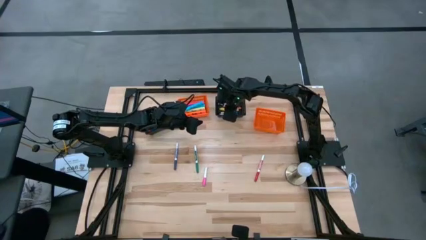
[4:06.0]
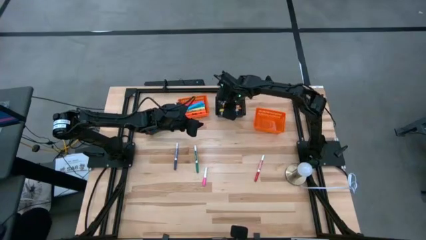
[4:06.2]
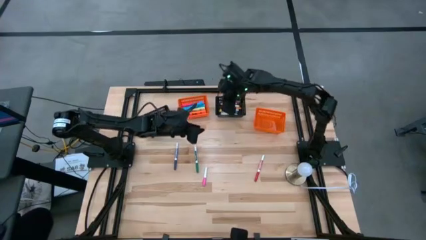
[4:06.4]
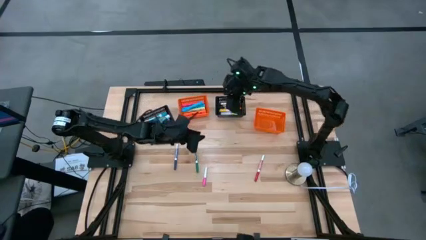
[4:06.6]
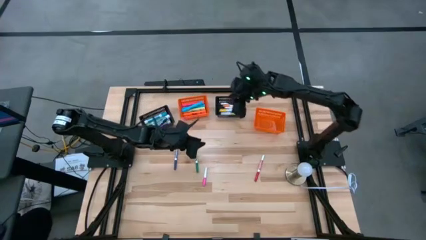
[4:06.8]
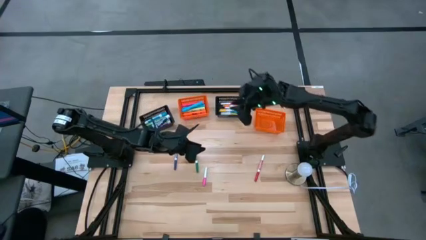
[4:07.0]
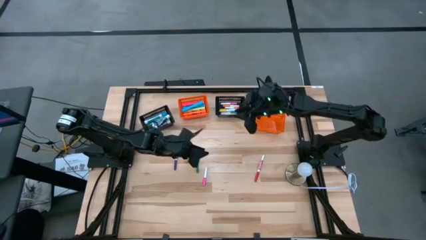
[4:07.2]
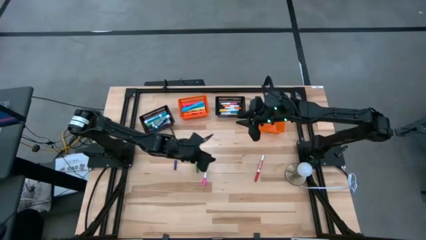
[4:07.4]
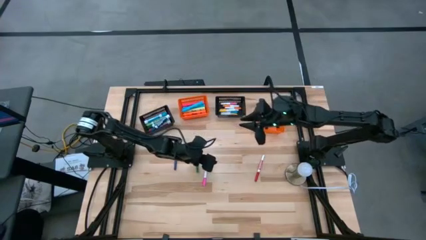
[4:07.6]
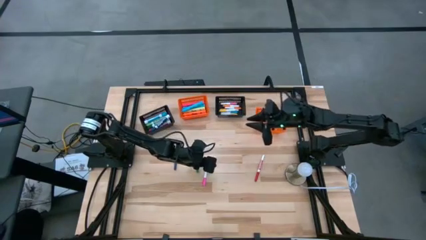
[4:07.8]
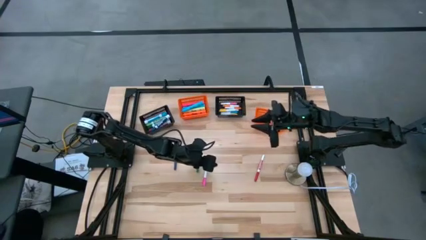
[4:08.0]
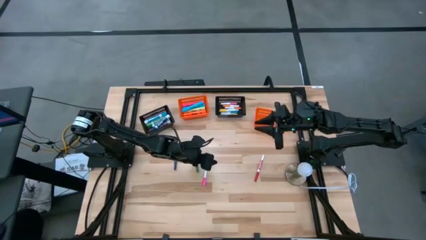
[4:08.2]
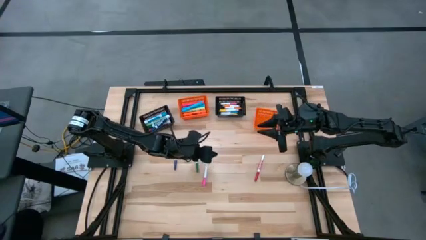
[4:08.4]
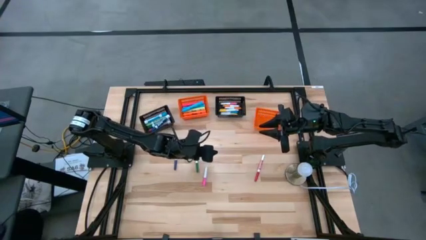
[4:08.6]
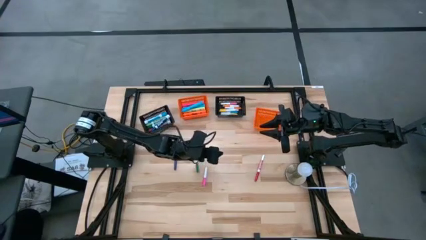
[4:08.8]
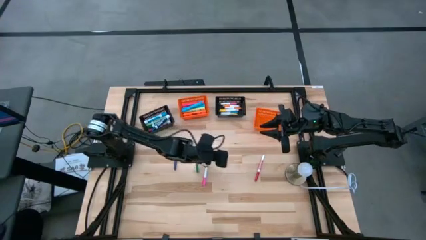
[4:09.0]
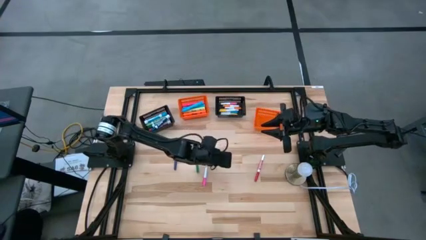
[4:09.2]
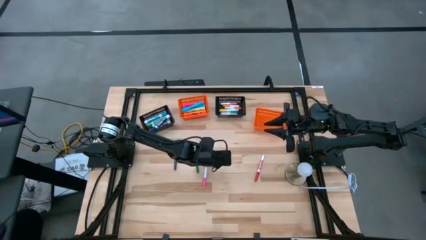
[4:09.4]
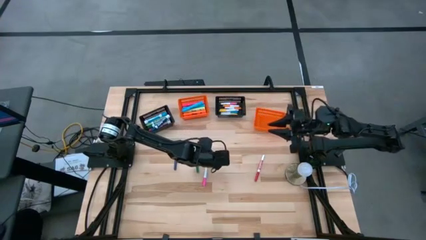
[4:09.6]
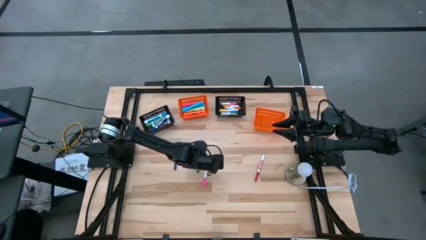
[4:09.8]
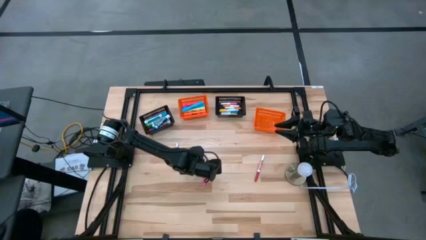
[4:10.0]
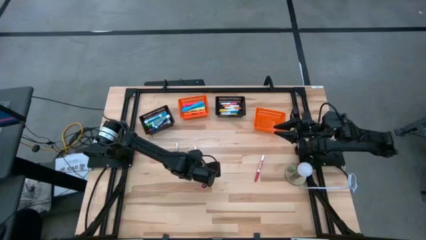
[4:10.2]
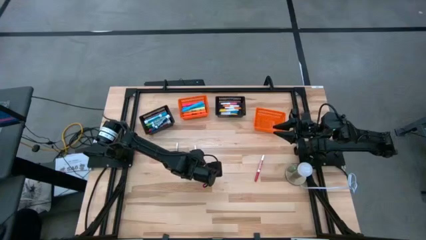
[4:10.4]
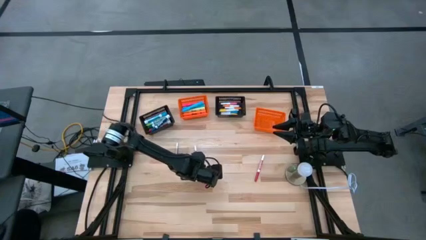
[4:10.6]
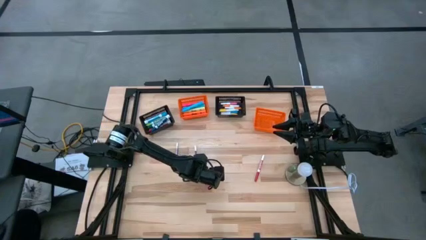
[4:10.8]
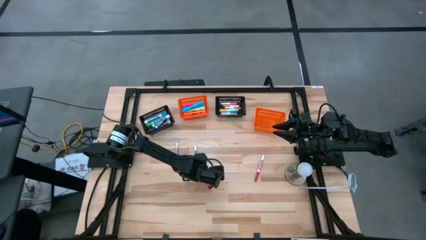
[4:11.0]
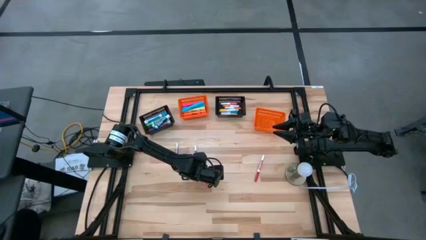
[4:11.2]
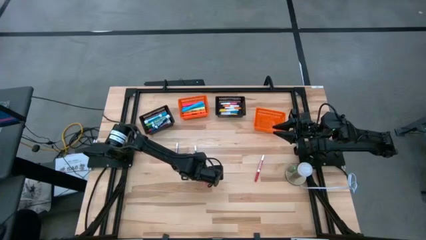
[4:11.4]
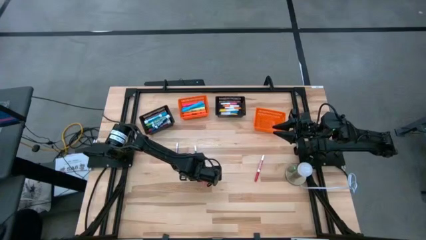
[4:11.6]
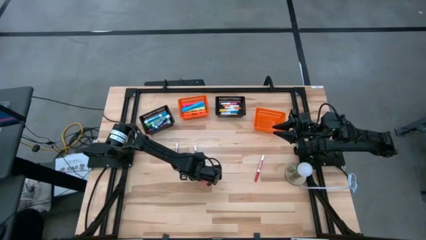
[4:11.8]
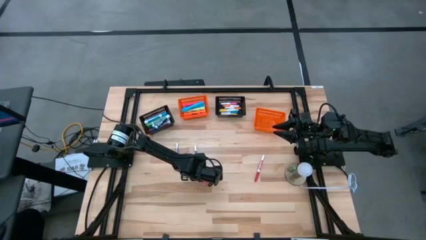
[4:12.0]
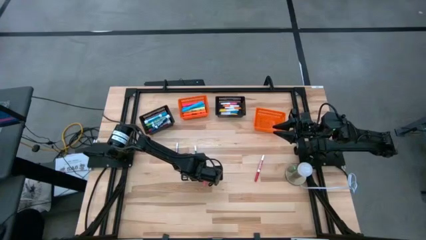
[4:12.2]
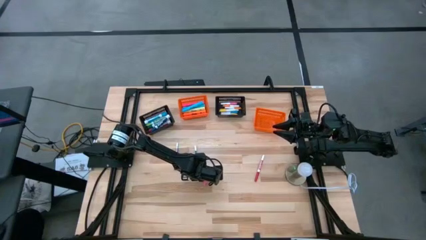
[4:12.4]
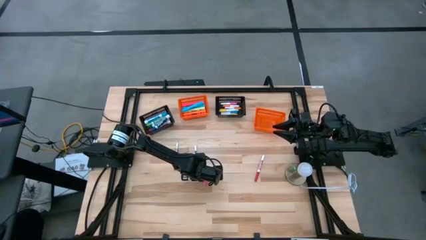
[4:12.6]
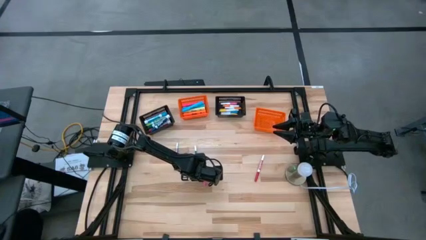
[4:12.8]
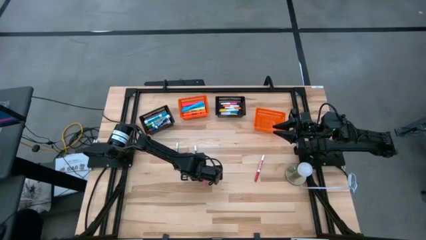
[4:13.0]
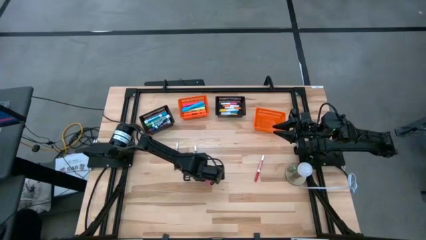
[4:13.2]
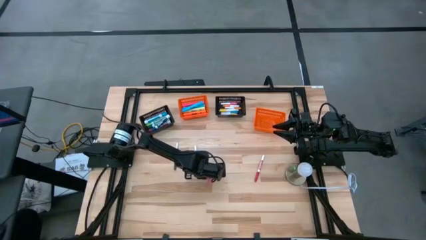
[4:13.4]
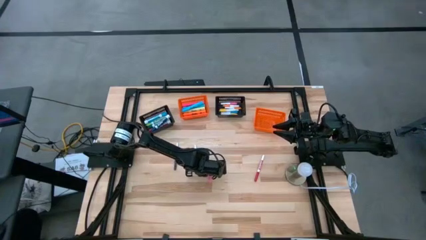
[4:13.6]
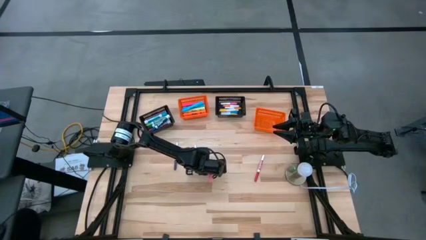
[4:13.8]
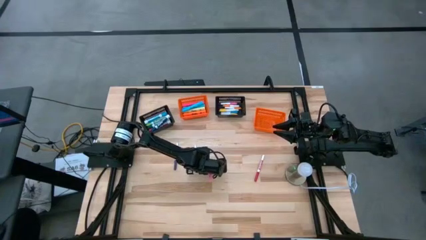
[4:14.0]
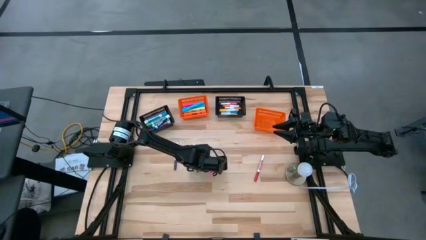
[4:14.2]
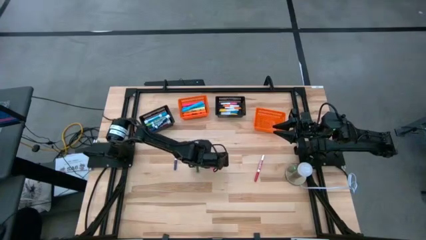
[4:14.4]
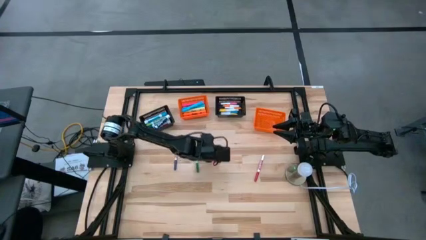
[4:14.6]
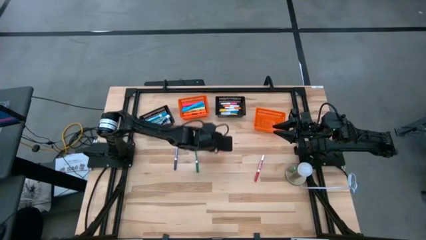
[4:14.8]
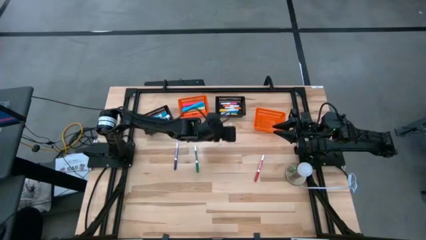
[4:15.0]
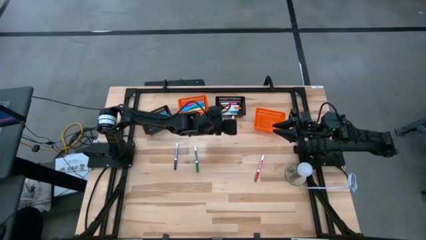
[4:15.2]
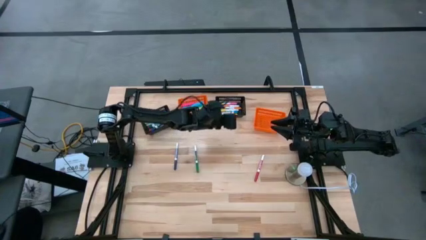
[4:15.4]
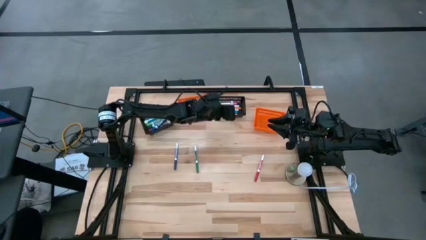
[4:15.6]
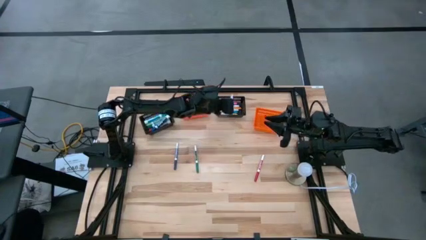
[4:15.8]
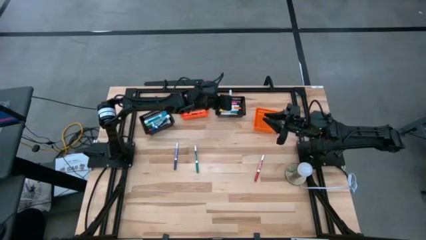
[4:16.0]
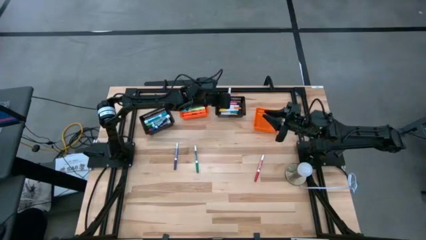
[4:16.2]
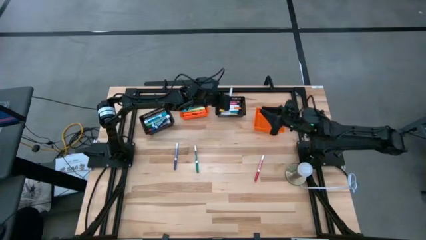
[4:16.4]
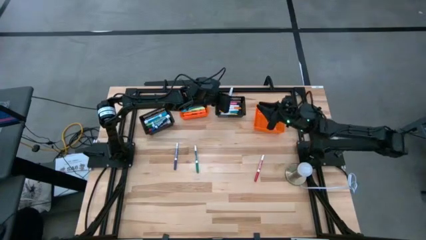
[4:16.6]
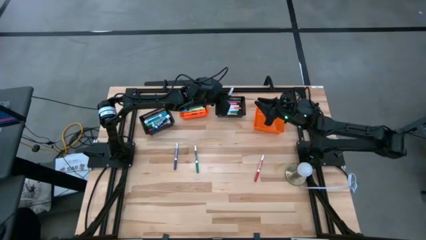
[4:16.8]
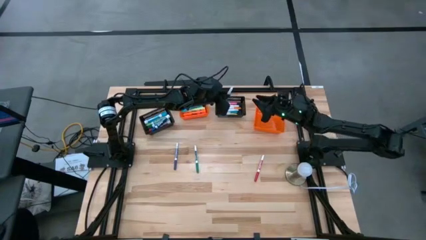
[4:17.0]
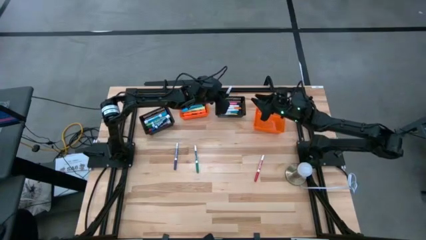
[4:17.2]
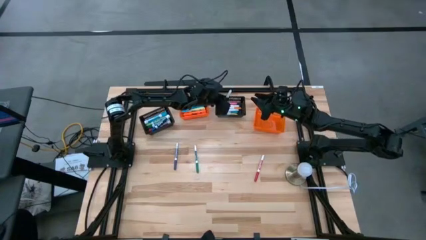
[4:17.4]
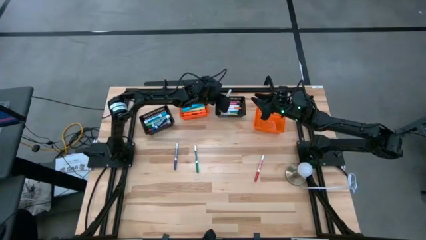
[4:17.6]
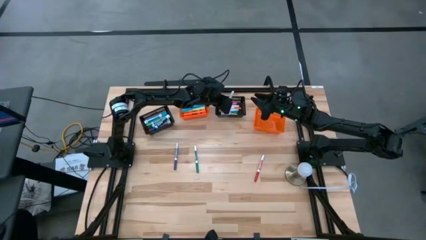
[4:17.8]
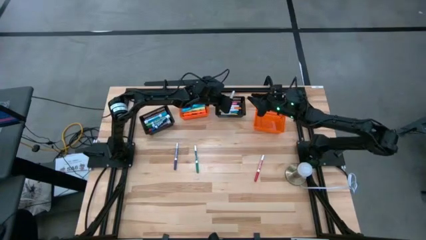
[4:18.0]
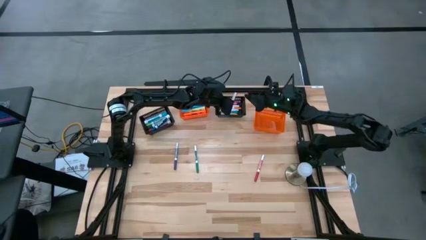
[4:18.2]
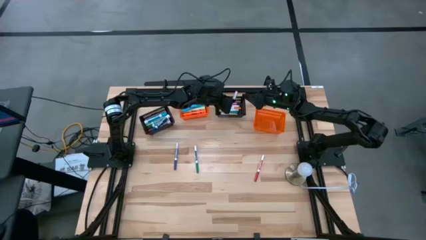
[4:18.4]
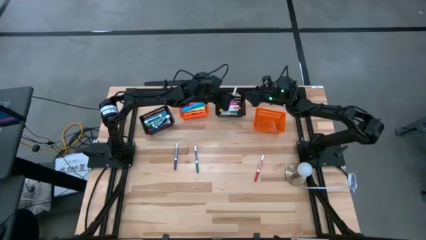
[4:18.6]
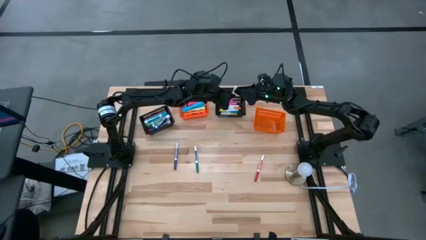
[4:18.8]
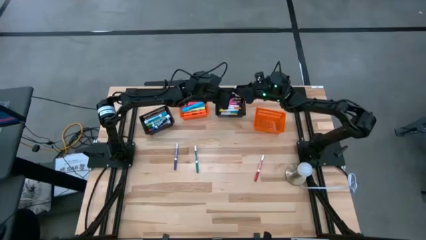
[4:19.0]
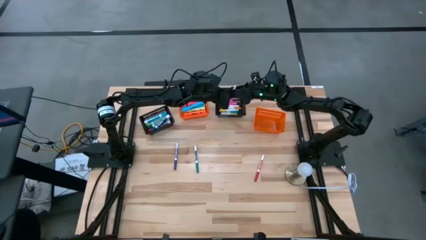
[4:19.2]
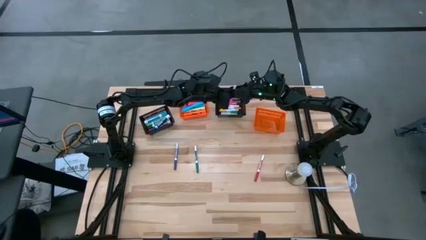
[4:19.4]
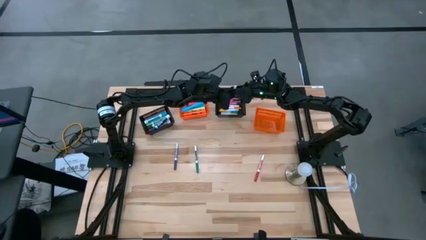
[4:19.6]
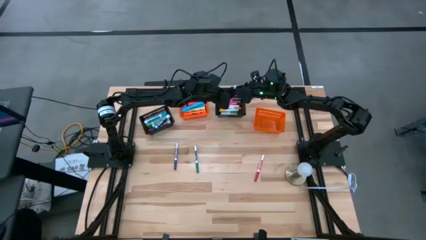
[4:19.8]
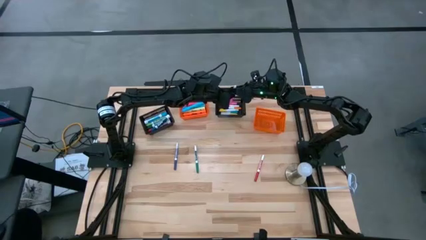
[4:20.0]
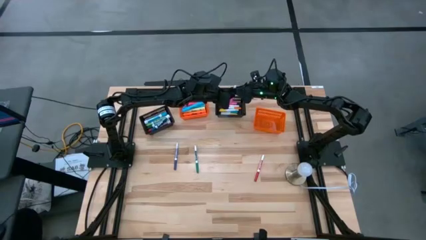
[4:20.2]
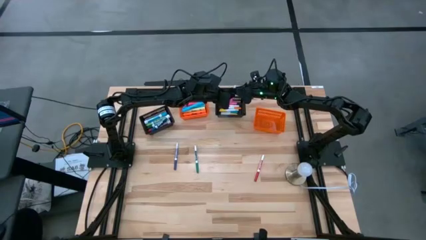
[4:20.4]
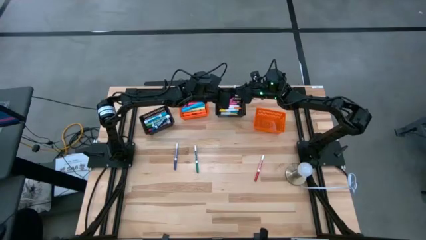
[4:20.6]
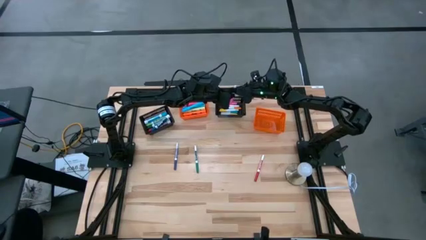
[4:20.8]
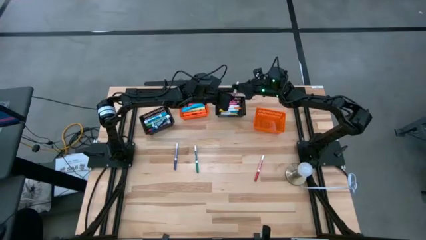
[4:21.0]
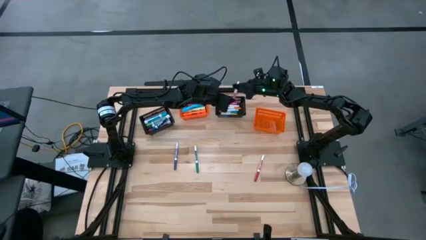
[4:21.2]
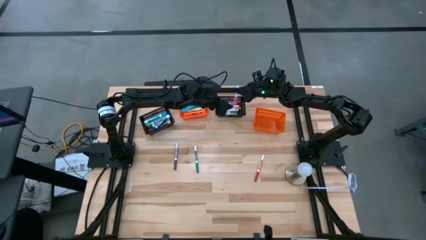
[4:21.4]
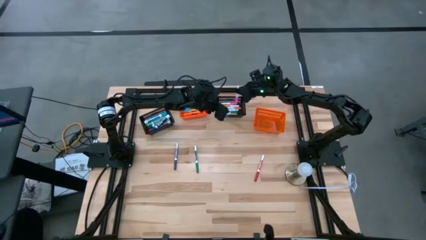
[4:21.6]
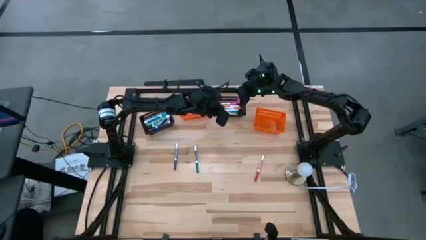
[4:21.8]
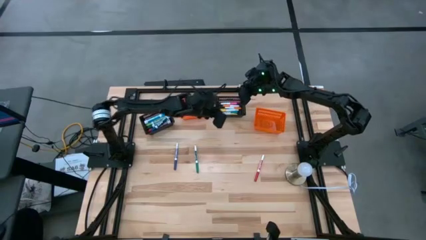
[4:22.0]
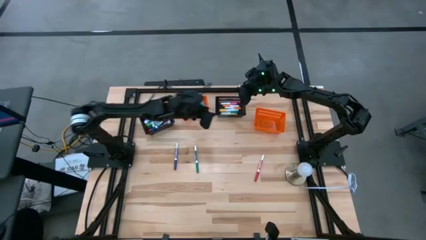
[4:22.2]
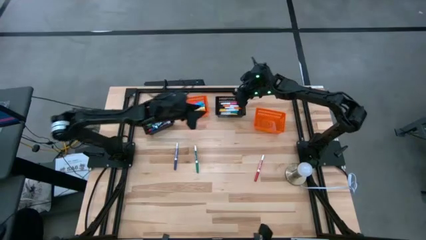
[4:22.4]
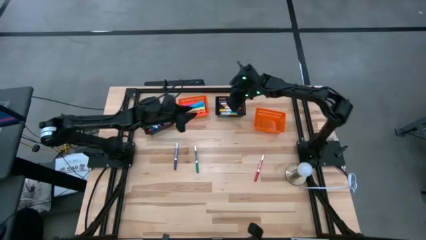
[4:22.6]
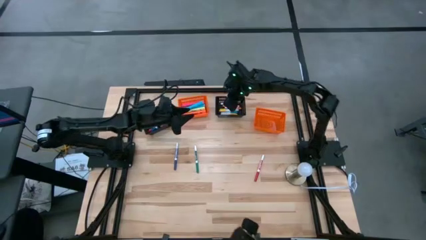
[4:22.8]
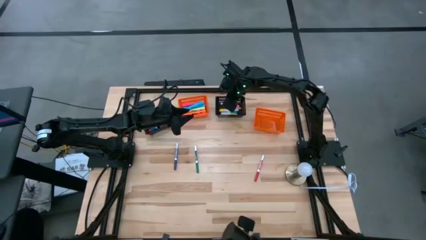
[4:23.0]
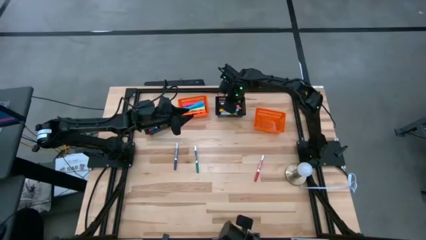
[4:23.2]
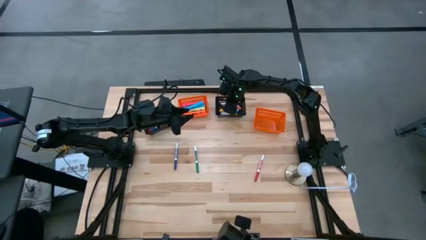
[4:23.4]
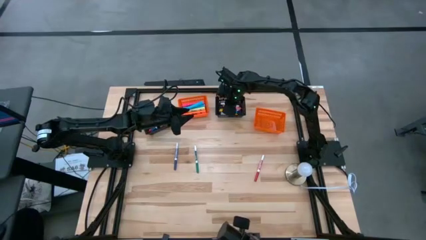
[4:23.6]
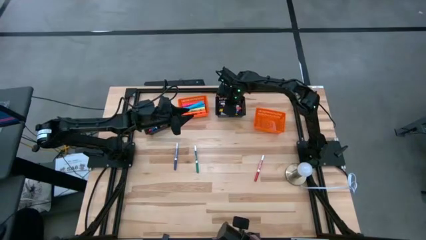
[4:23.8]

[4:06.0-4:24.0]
Task: Pick & Place Markers
Put the small pink highlighter pen into the right black bin
